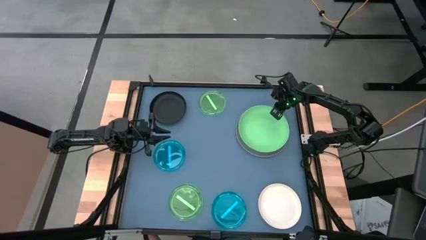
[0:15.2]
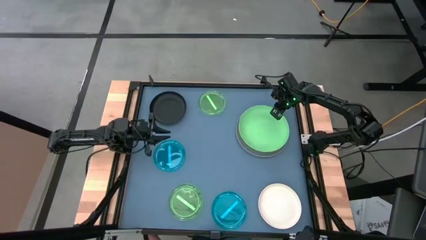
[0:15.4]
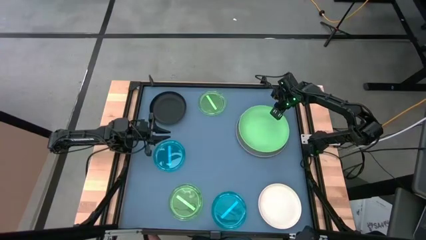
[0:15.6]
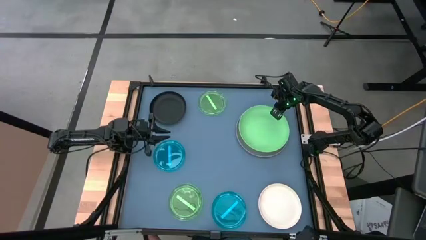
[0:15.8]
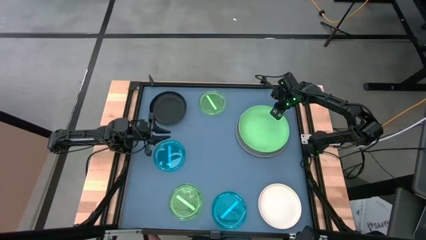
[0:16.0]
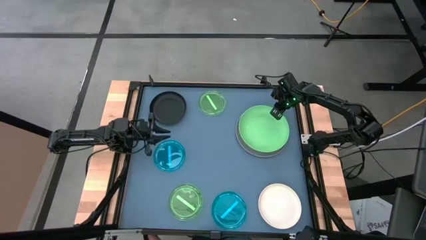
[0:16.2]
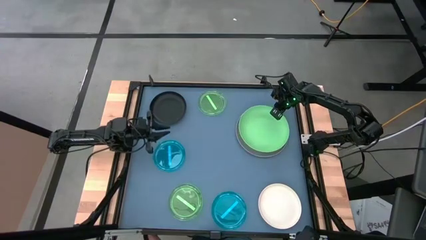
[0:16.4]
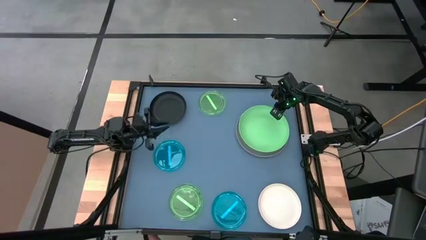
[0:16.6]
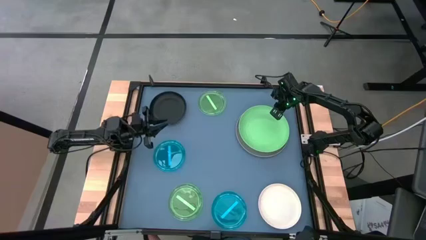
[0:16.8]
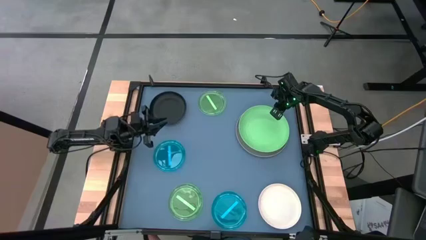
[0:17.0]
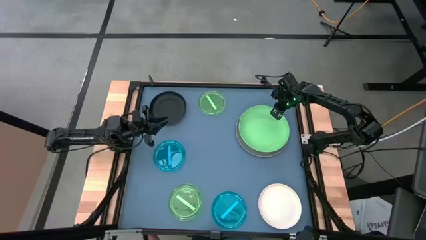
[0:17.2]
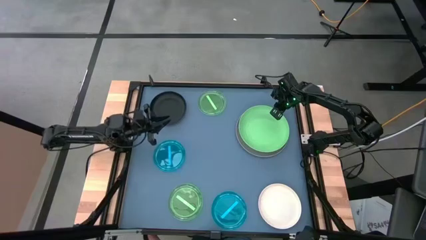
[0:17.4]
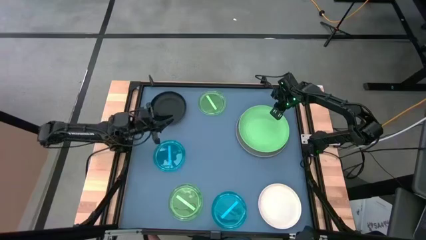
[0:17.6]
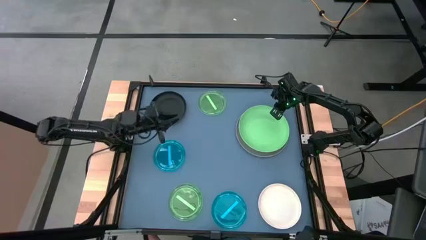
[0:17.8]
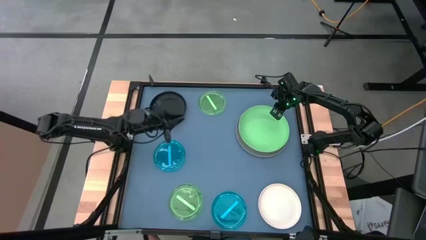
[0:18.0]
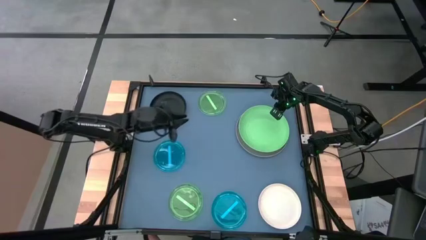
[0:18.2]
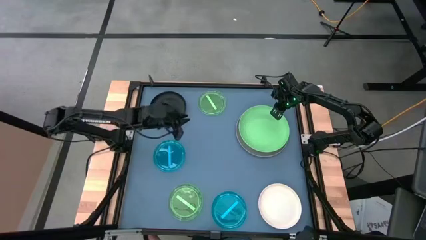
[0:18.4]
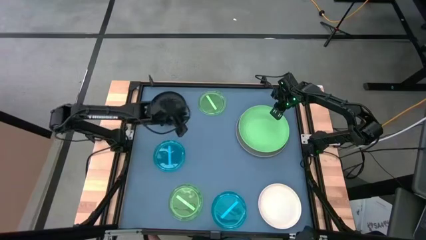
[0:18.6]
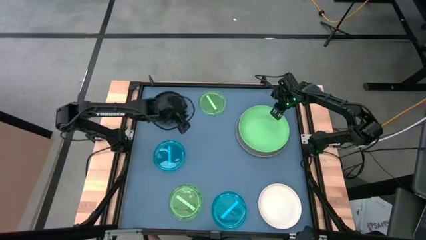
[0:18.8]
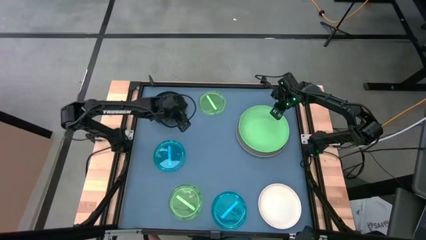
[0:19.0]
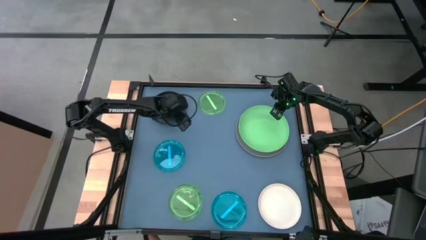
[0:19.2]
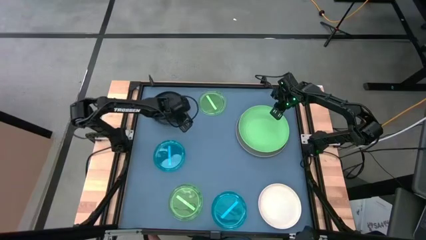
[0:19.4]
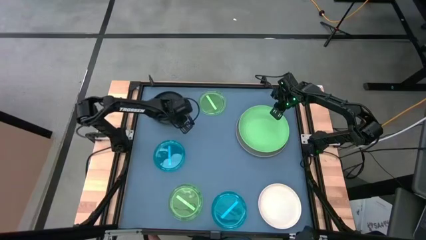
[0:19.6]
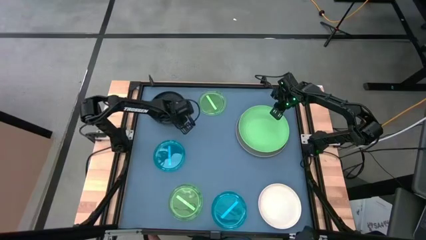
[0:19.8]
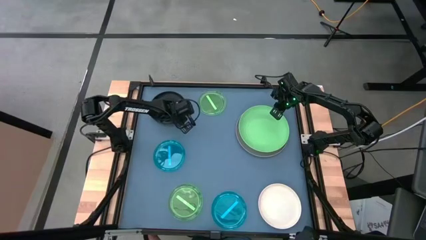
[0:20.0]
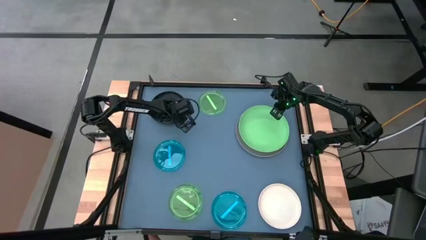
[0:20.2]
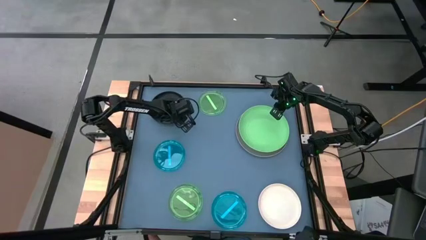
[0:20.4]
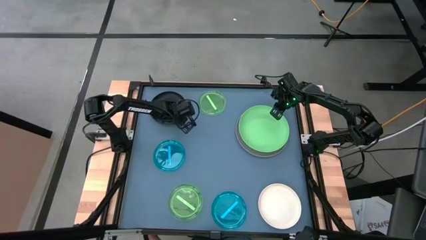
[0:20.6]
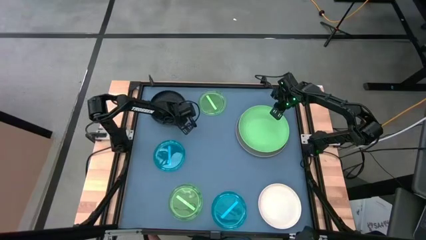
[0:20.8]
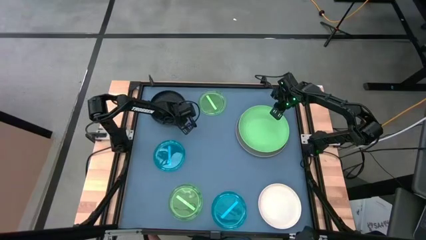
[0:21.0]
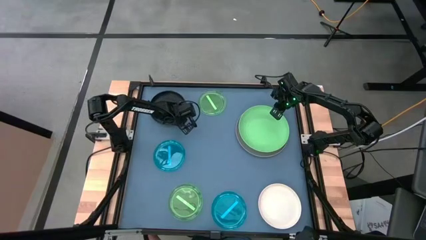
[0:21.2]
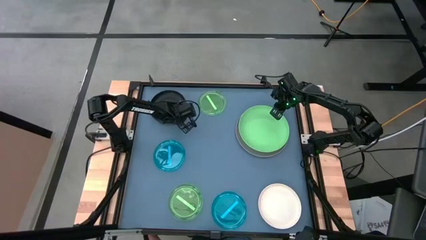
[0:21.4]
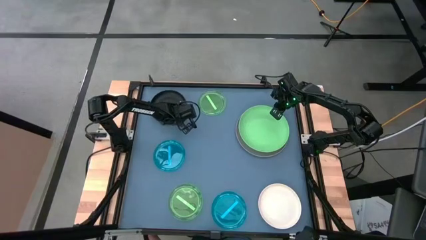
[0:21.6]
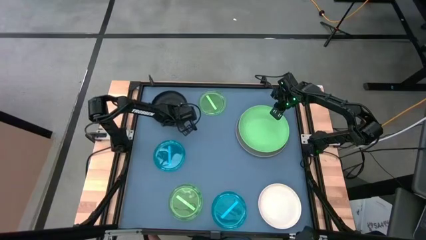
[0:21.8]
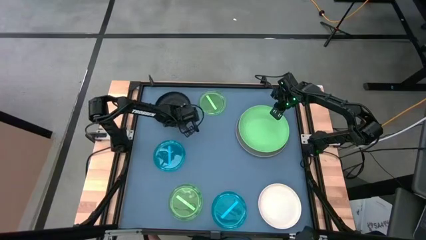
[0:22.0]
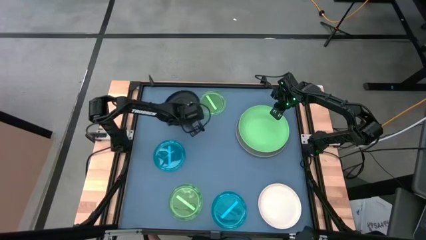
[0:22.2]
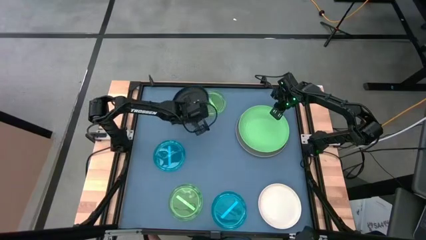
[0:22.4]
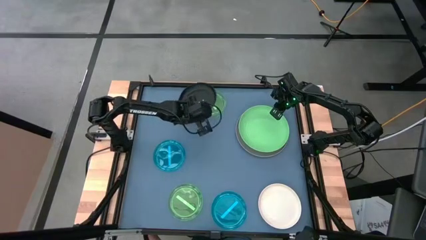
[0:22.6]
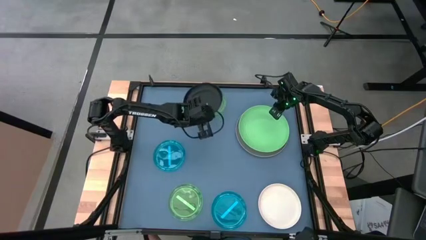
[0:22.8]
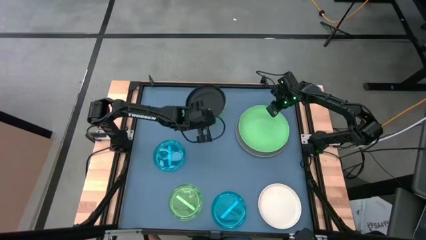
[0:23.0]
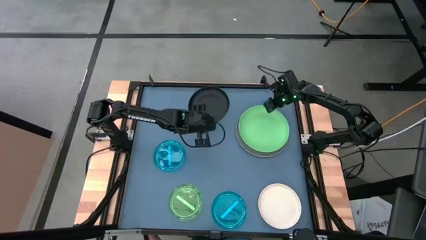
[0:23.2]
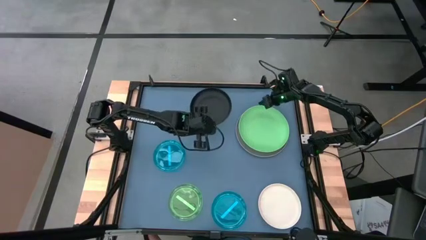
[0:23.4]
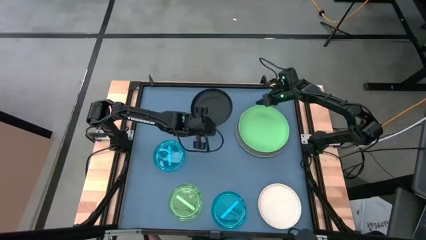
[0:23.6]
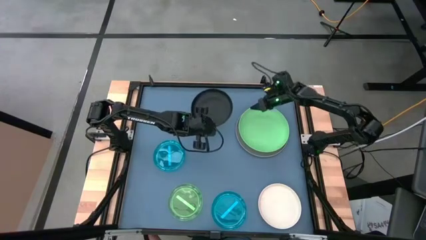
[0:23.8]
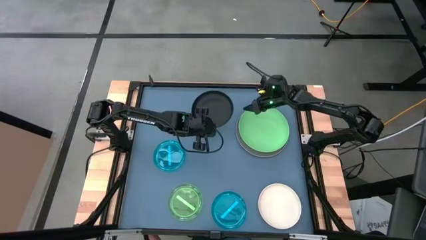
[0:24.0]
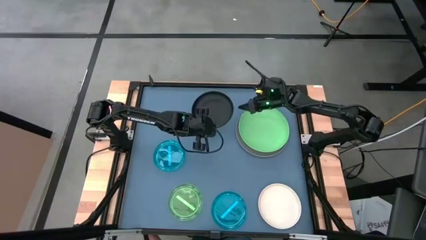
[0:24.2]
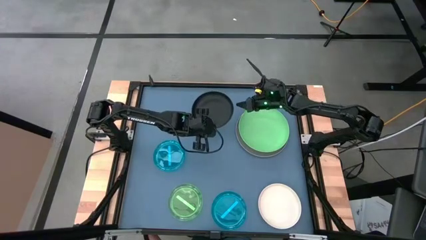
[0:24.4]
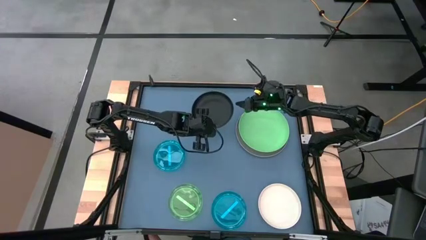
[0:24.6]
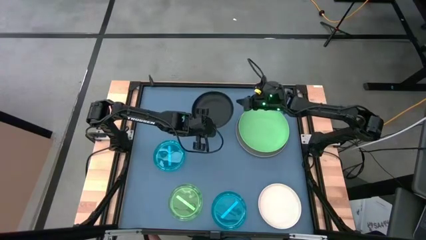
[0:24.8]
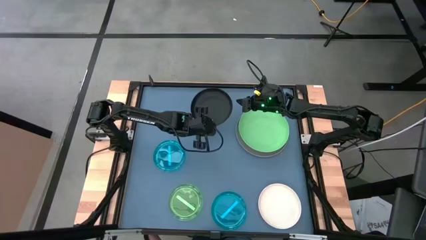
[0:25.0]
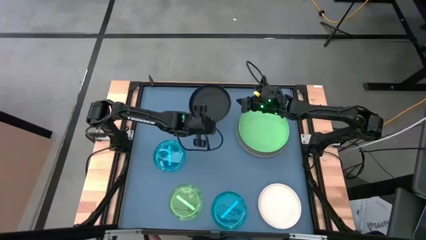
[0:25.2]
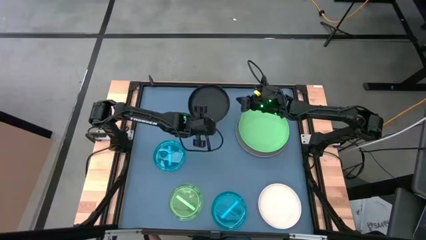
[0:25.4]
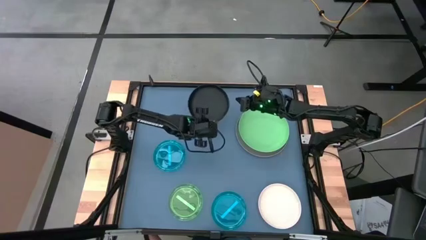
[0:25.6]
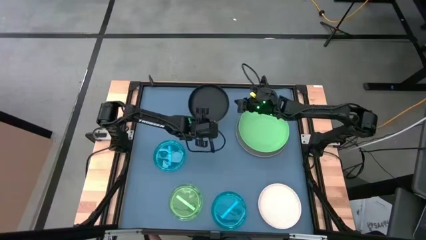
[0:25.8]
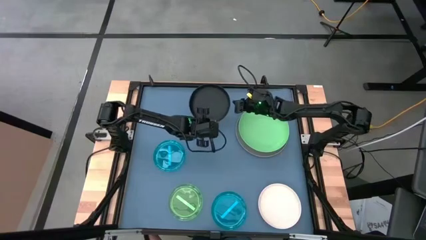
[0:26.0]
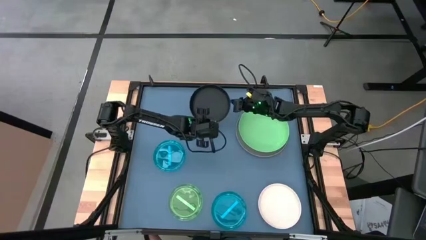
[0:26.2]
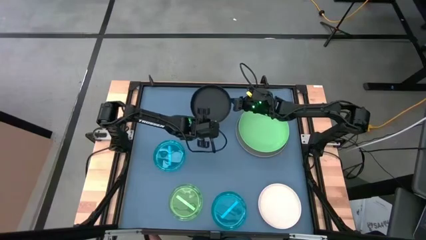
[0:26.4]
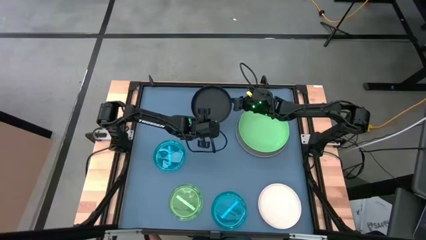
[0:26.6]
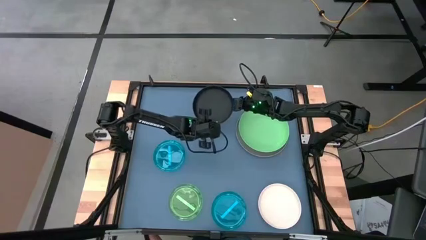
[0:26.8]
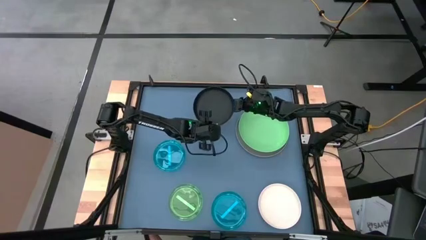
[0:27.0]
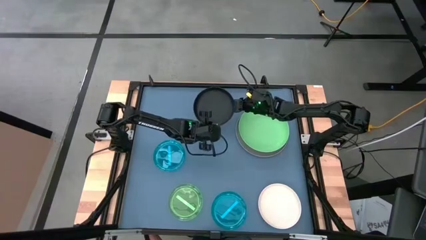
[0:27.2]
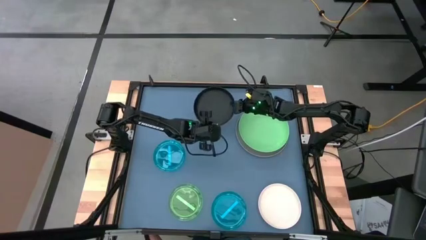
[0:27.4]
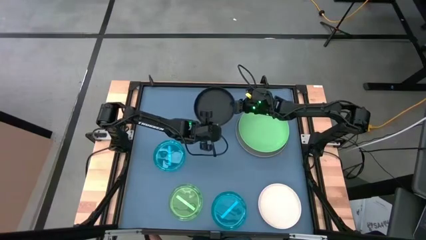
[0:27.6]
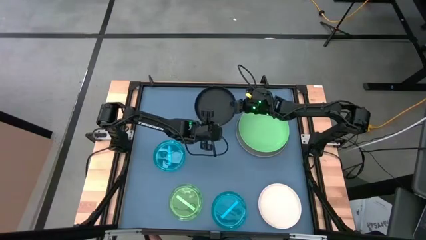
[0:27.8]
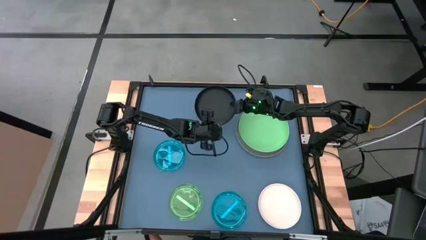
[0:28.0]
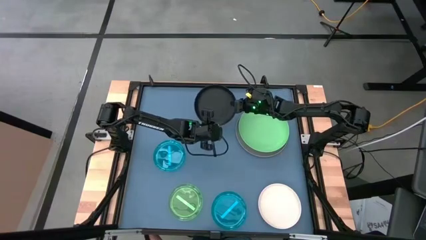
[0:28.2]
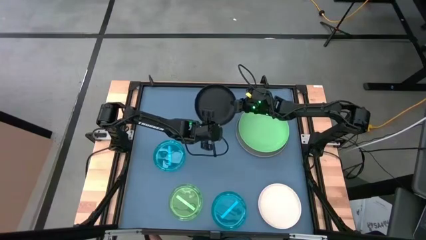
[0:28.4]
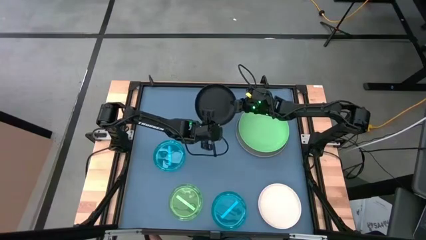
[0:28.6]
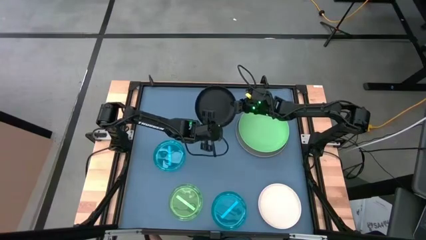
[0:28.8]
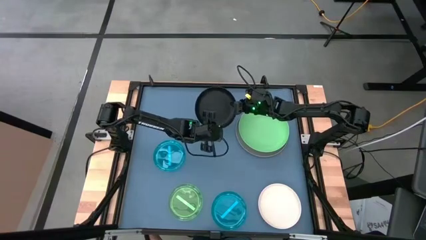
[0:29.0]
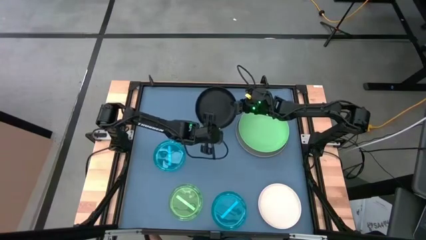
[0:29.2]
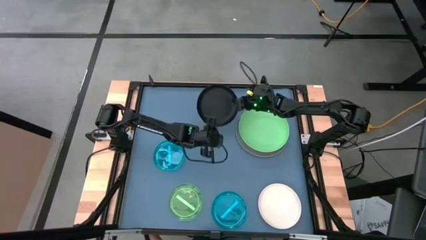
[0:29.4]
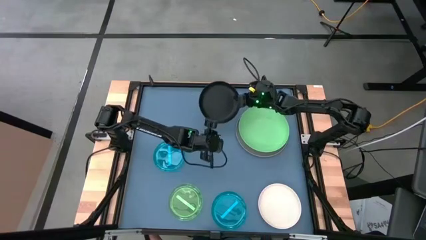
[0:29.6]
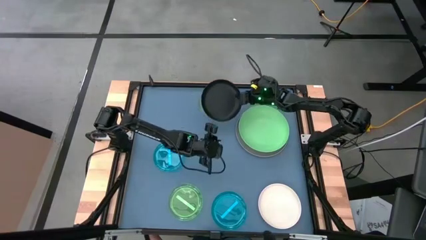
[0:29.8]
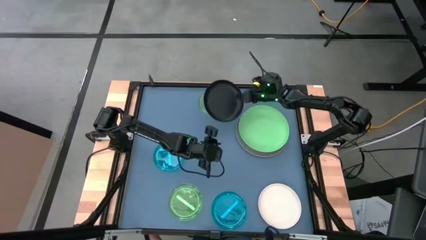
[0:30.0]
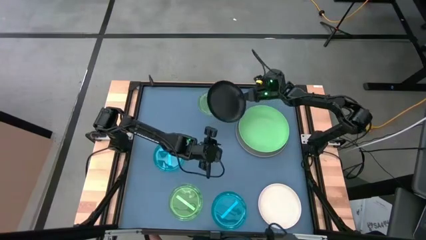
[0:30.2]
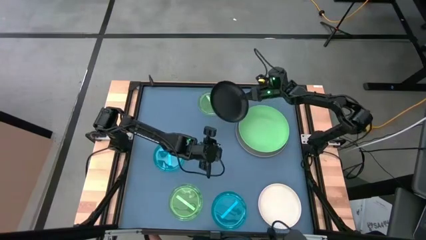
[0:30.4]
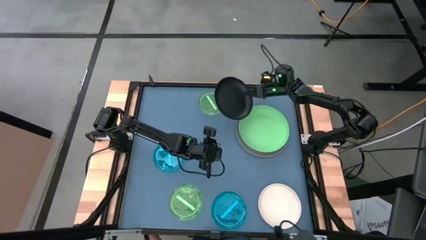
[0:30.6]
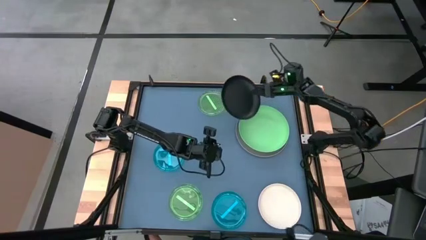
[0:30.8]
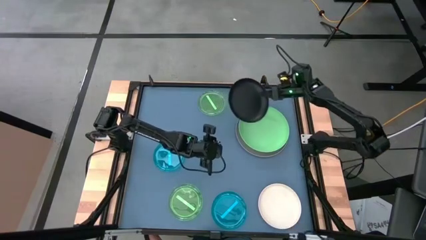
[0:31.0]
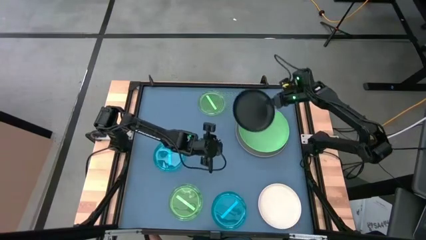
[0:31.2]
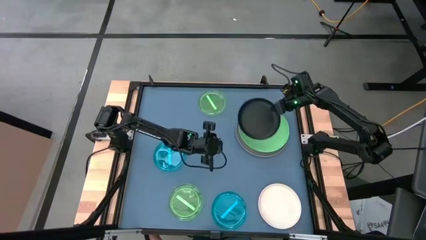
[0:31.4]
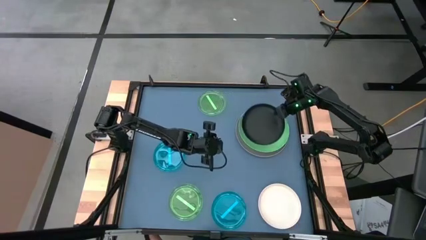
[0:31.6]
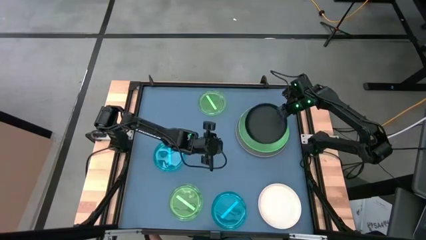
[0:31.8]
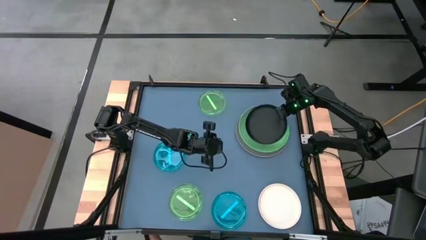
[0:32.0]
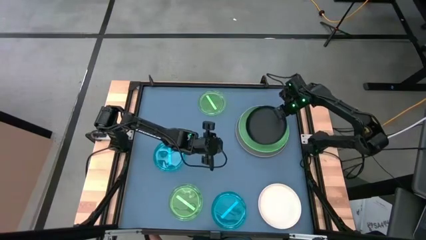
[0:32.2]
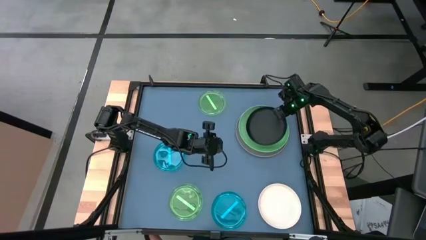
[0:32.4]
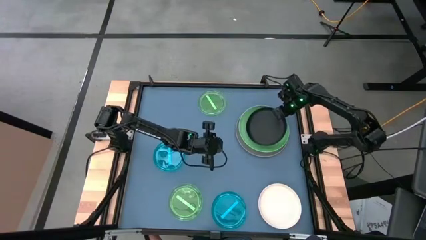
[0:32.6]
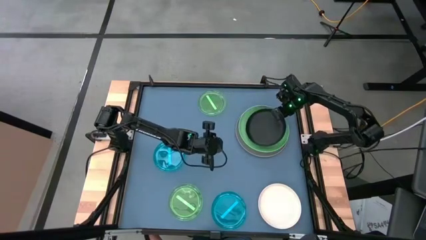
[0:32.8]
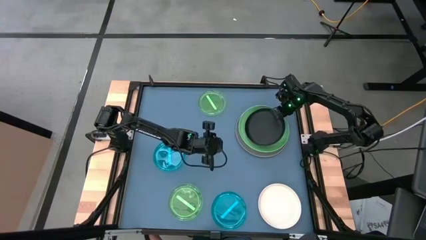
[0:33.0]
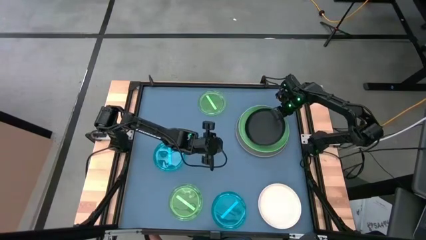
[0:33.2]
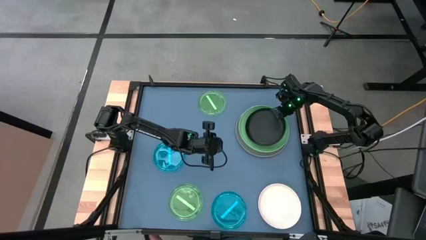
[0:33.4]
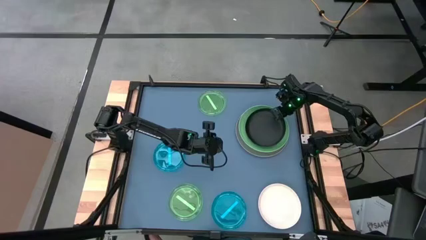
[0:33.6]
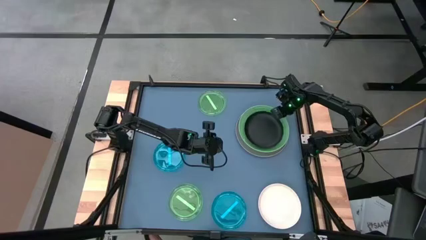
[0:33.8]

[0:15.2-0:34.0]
Task: Stack plastic plates
Stack the black plate on the large green plate
